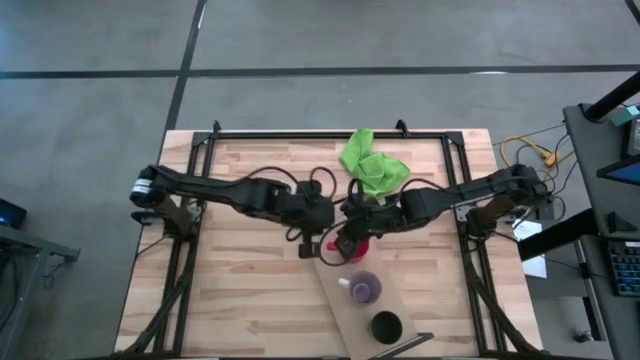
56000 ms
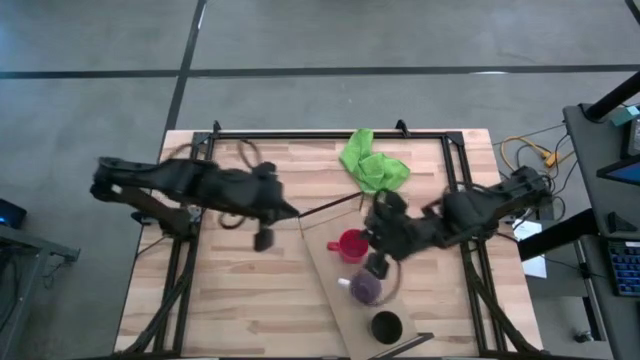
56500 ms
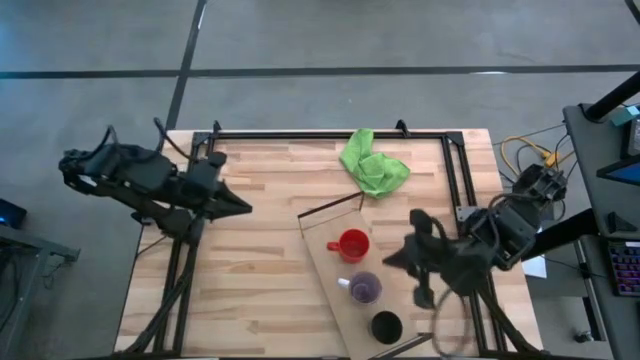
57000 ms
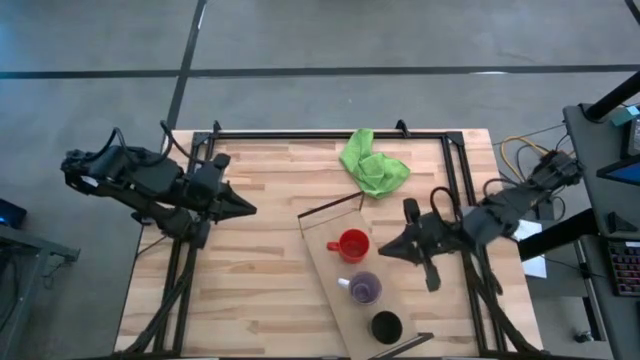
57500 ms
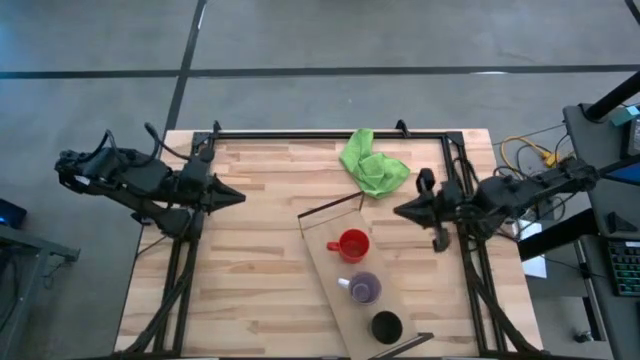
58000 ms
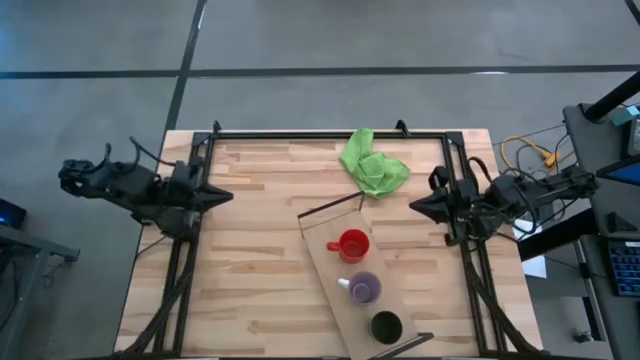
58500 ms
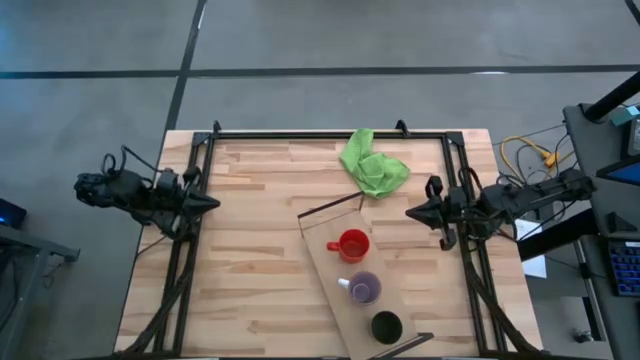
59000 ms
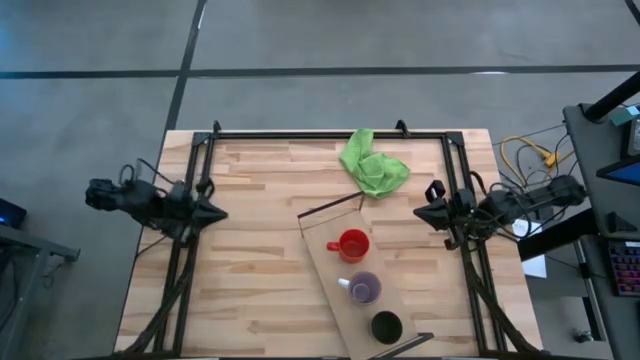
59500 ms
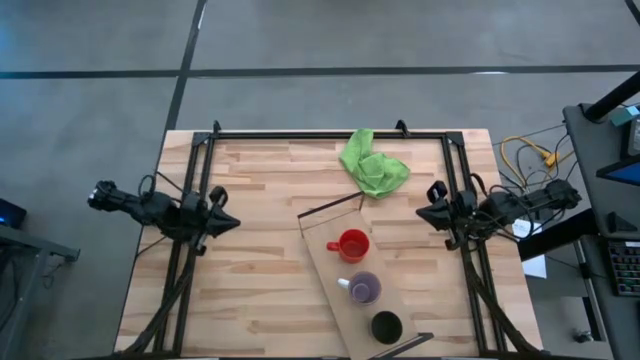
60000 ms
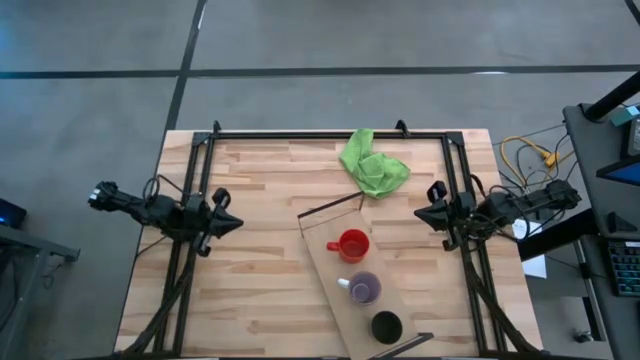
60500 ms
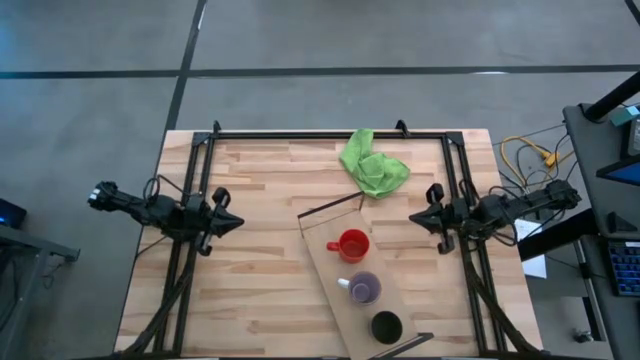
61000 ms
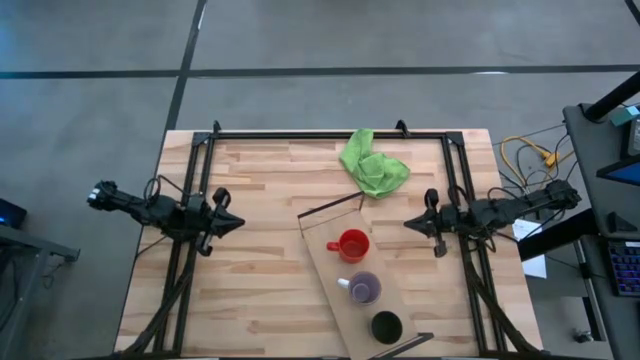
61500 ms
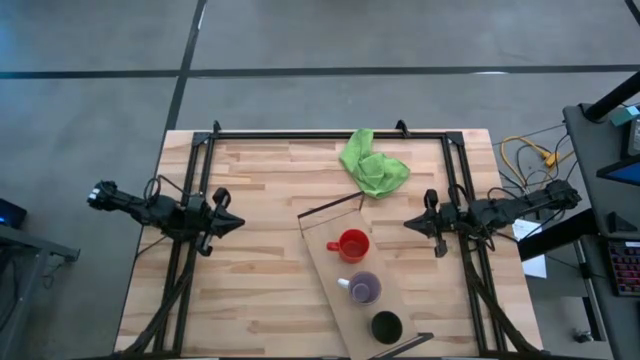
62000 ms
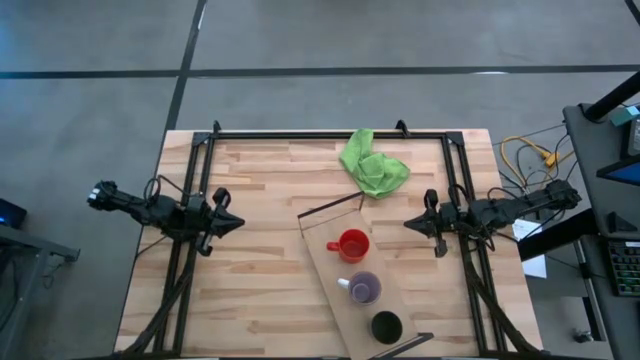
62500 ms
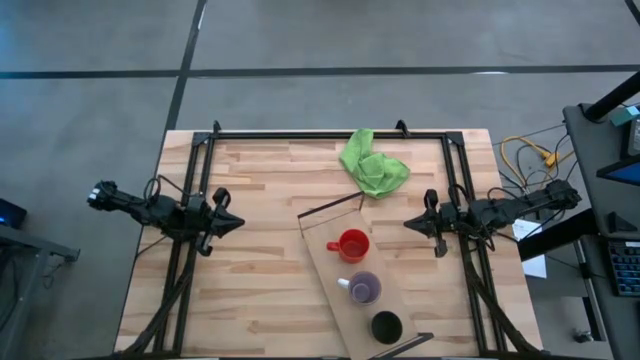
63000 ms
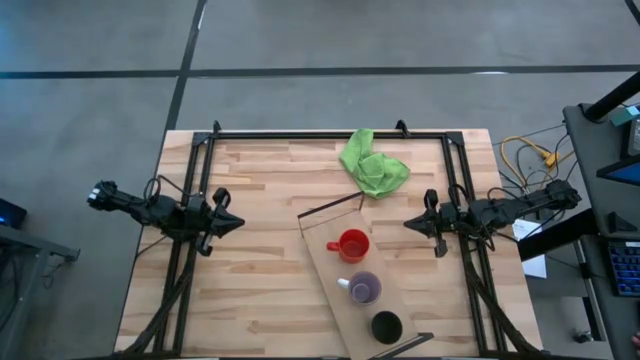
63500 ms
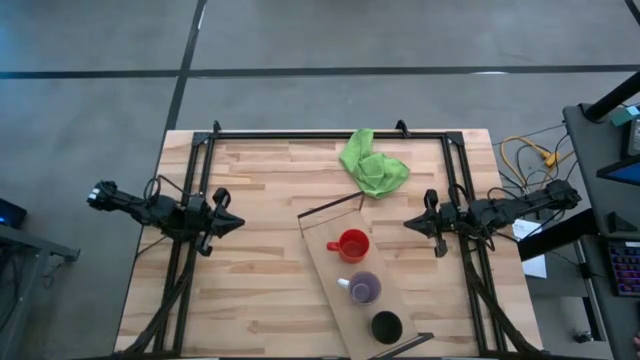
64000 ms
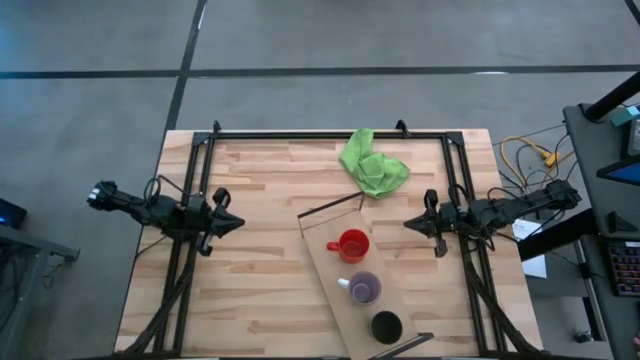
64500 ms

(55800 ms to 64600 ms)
Task: Stack small to large cups/mugs on shelf
Return to Home Position

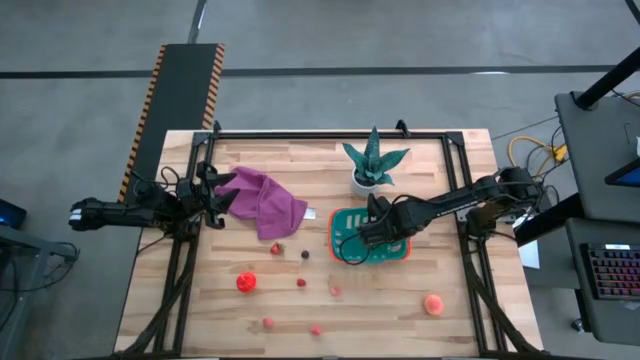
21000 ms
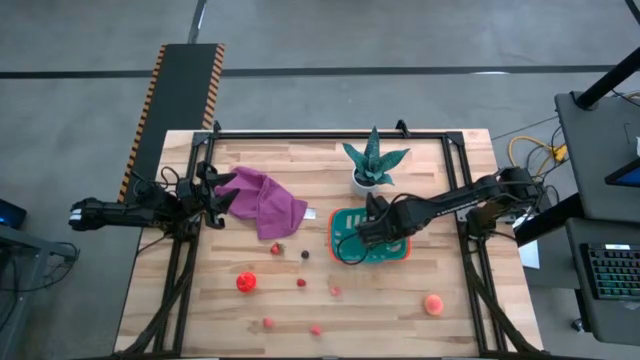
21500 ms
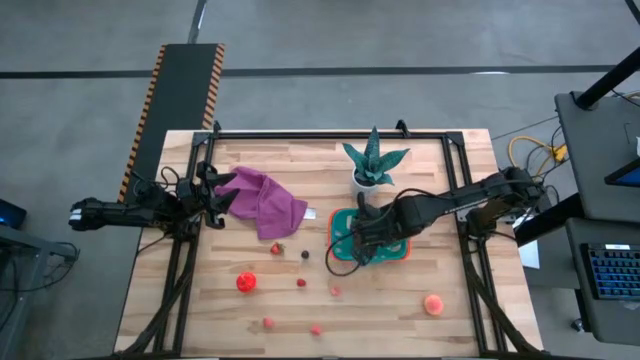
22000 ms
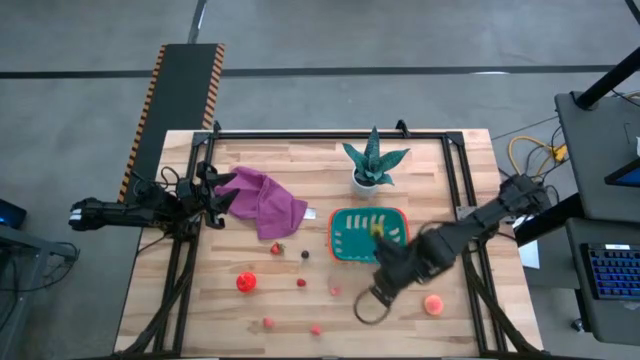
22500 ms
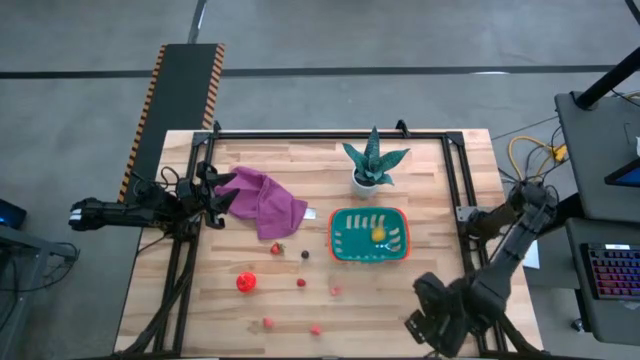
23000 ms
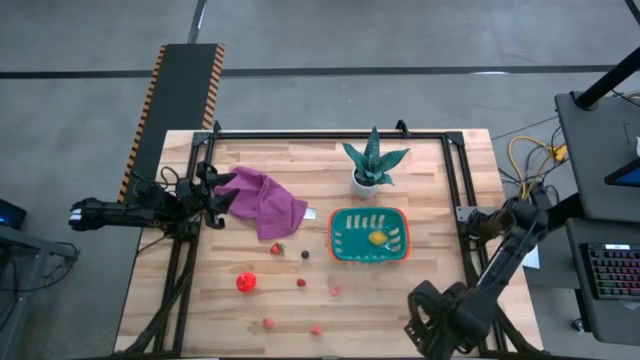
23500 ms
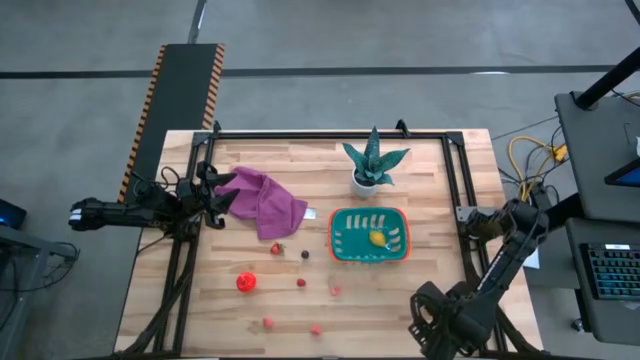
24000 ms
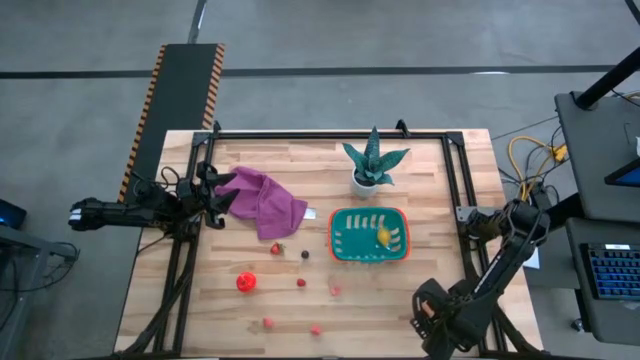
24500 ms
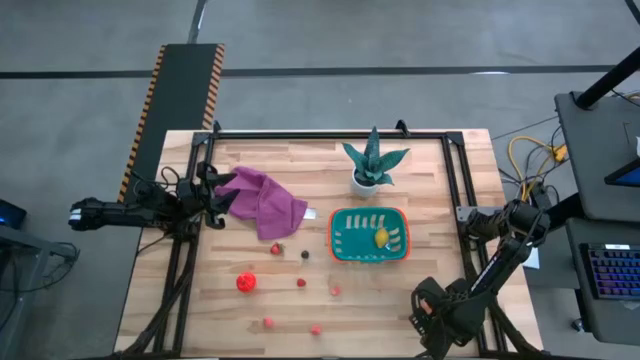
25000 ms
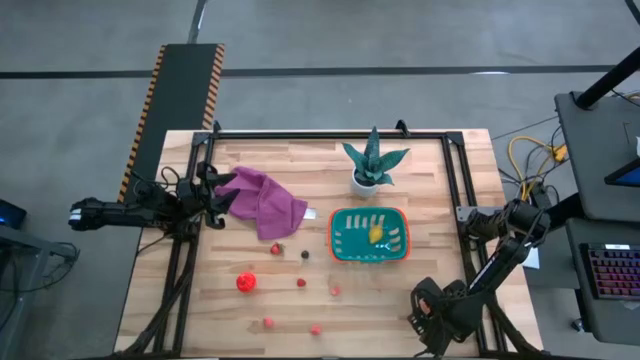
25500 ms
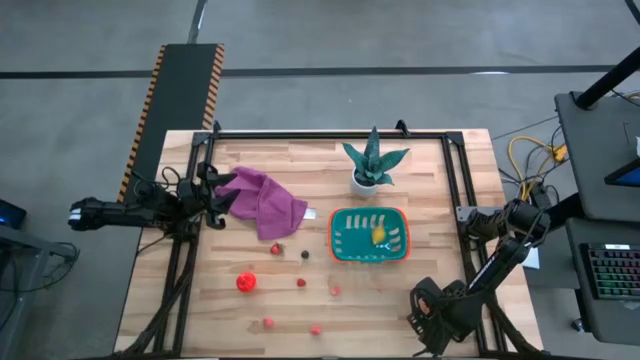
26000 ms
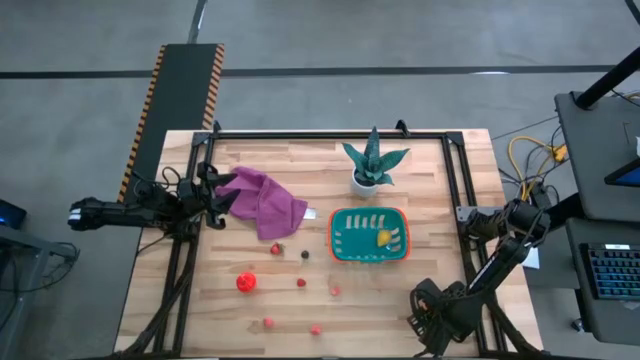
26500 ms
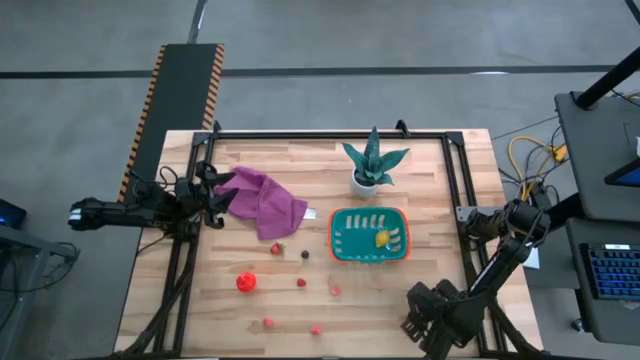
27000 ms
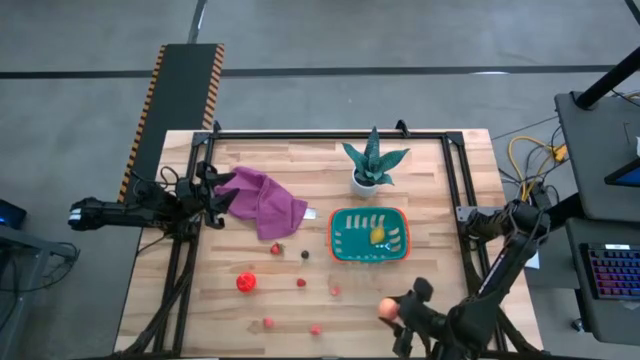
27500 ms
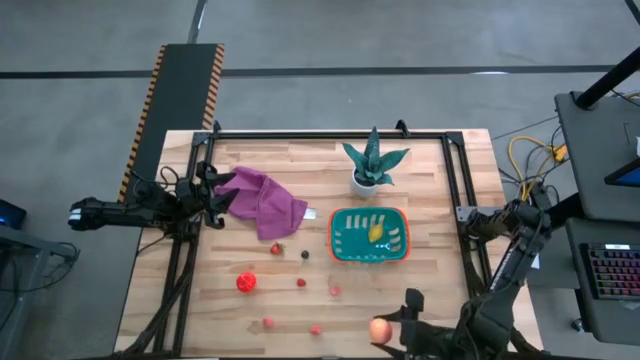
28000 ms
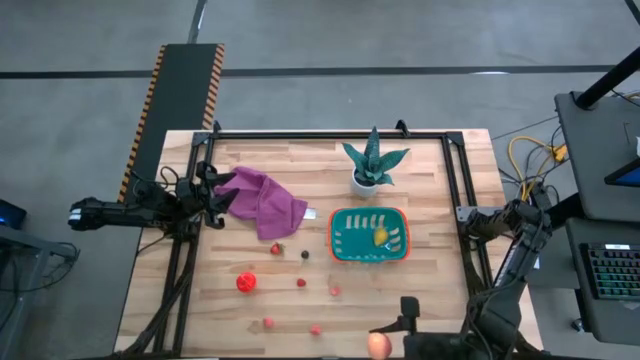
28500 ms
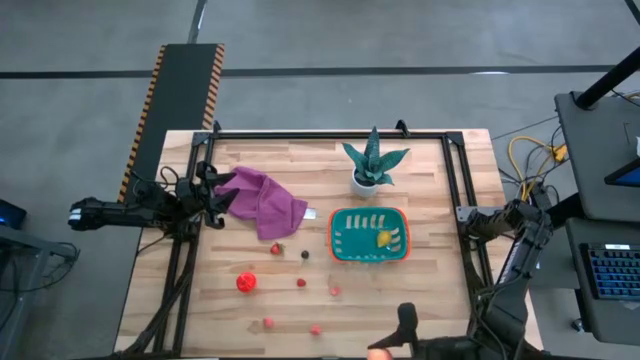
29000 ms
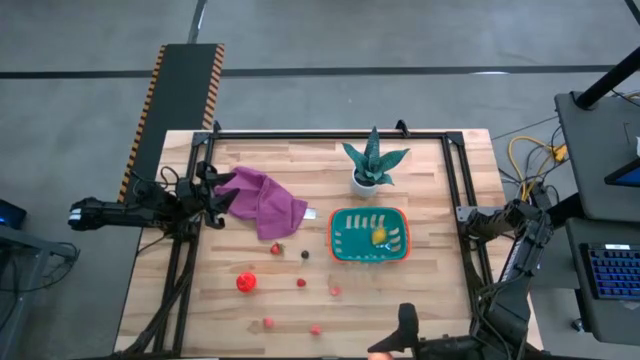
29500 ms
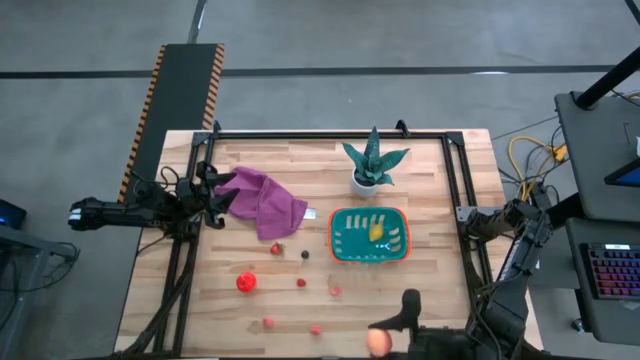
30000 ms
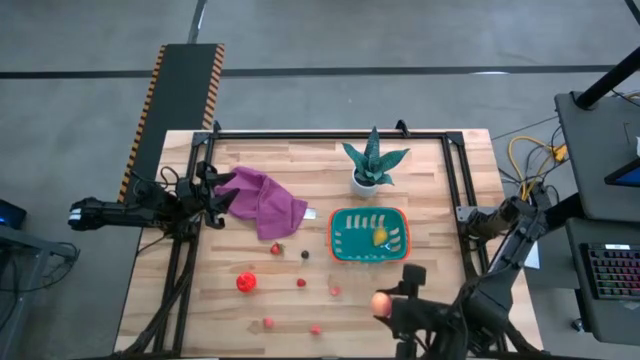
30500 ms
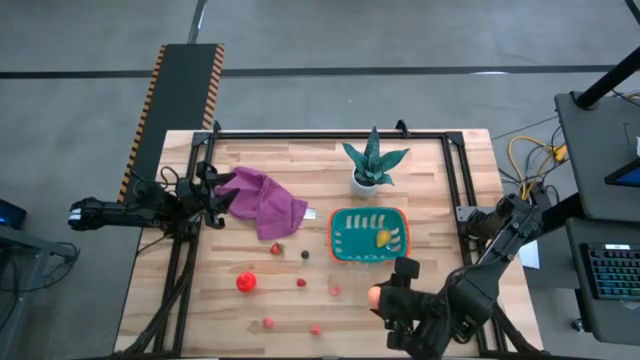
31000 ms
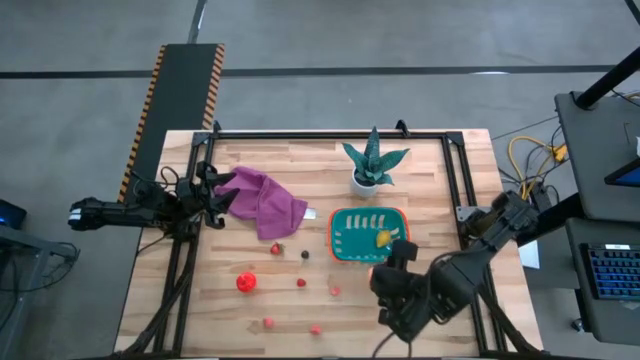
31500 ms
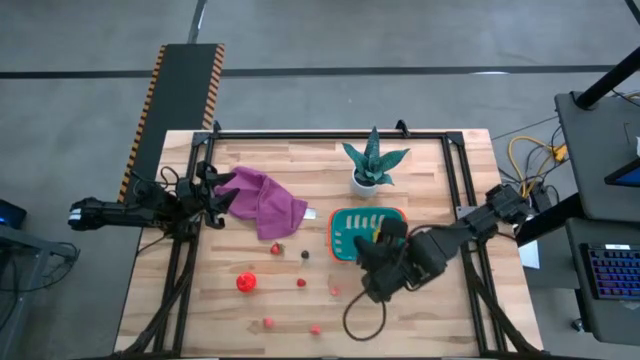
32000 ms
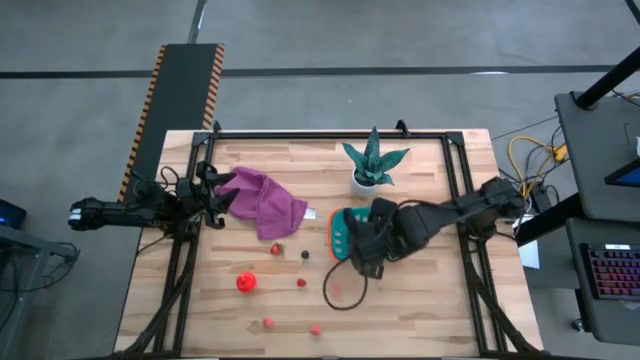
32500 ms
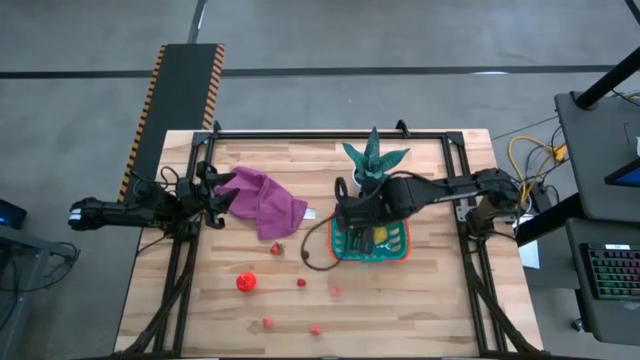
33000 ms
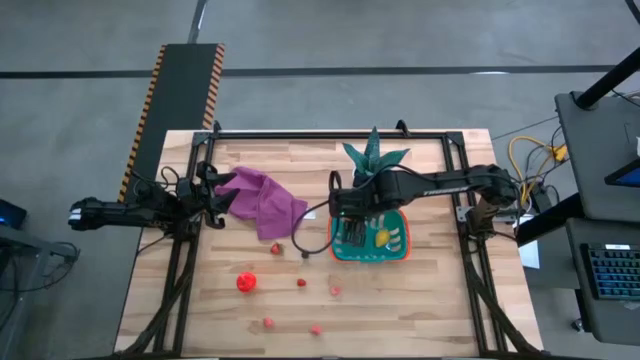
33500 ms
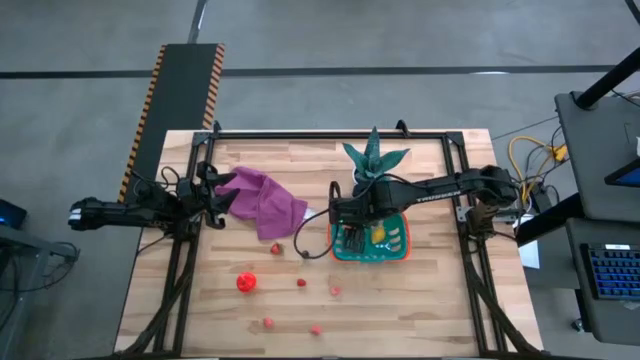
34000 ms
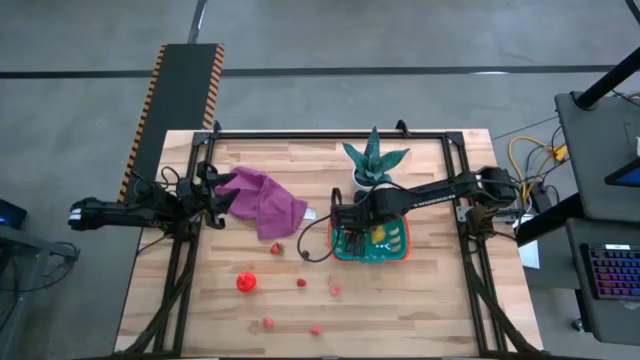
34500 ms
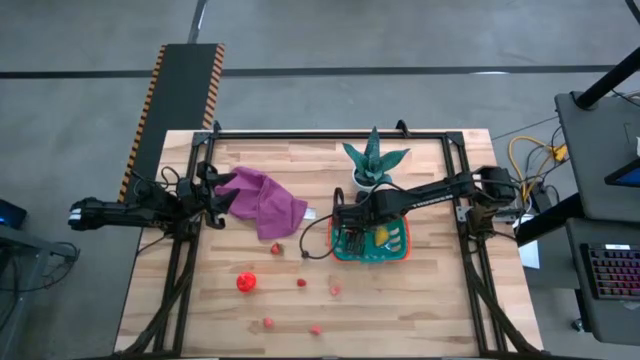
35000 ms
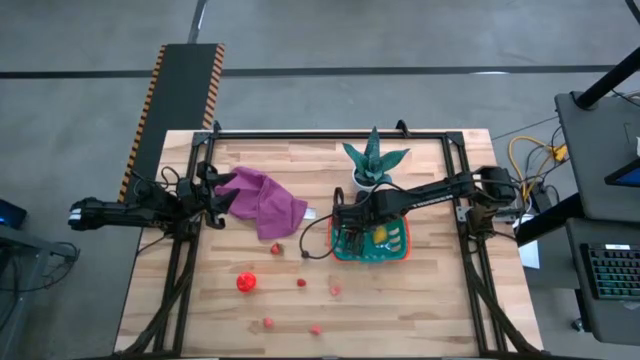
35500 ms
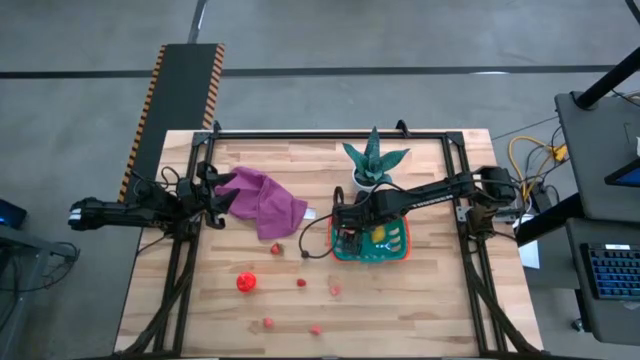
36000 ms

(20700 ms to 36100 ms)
Task: Pick and placing Produce into tupperware
Put the peach into the green basket
